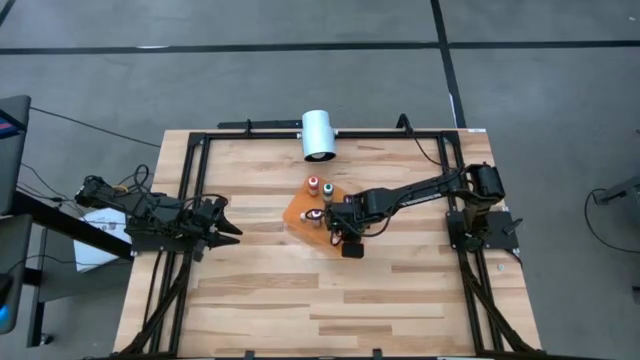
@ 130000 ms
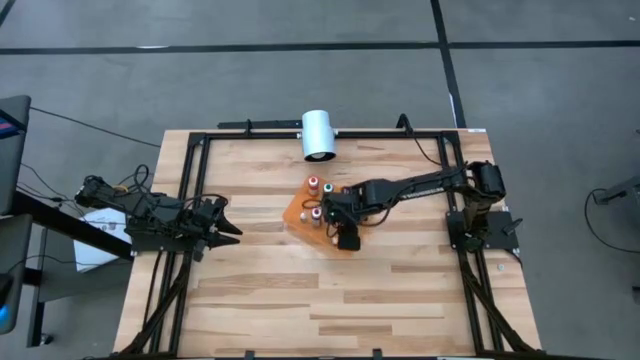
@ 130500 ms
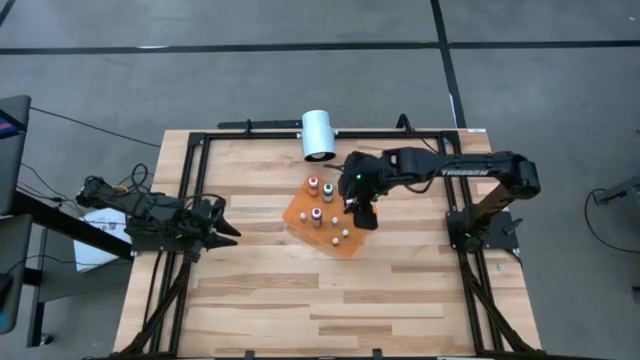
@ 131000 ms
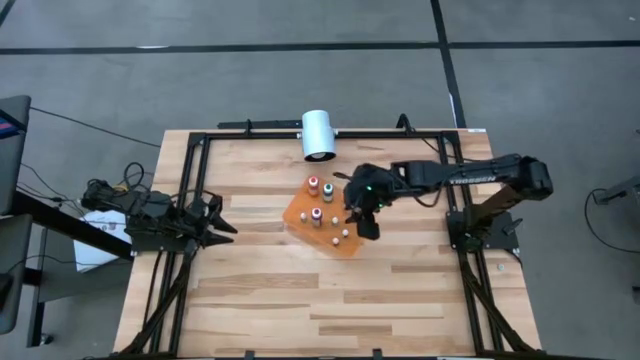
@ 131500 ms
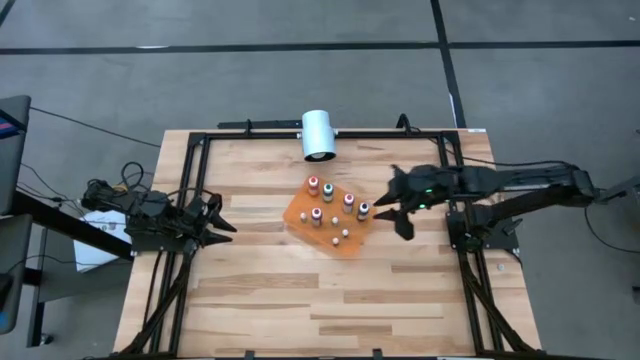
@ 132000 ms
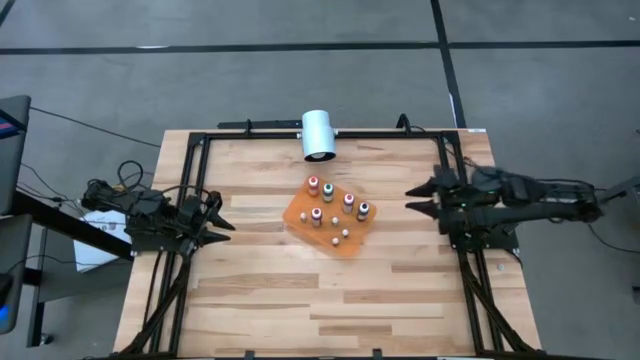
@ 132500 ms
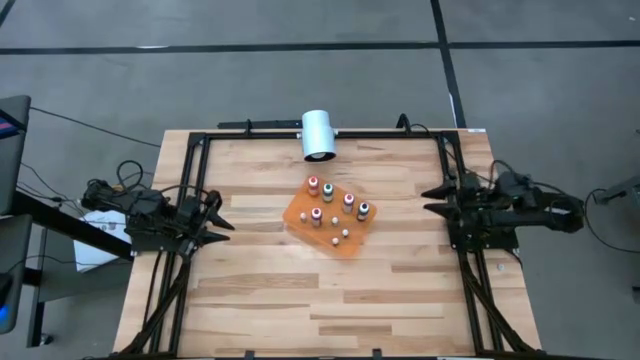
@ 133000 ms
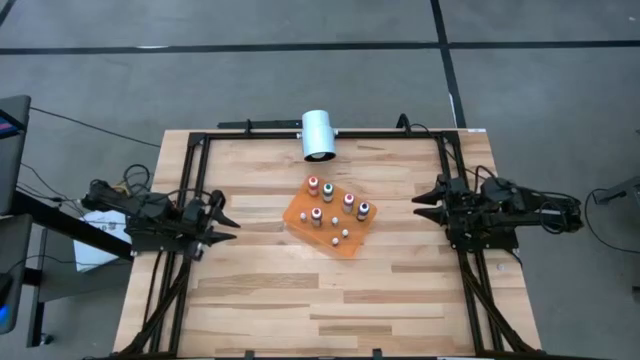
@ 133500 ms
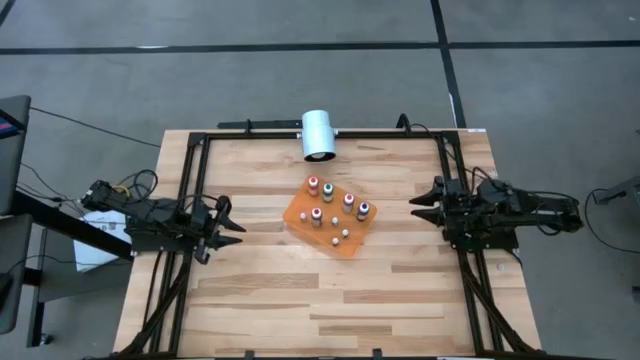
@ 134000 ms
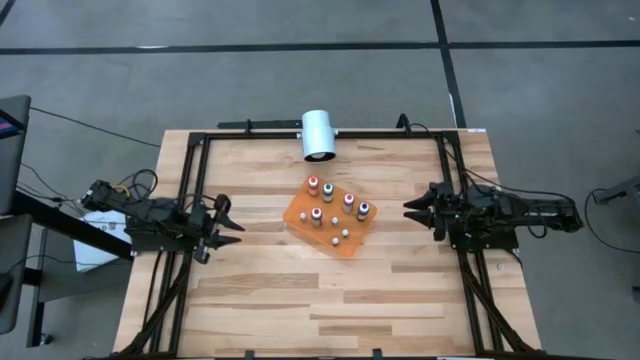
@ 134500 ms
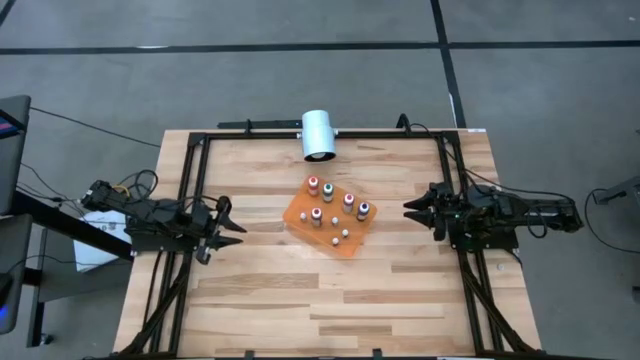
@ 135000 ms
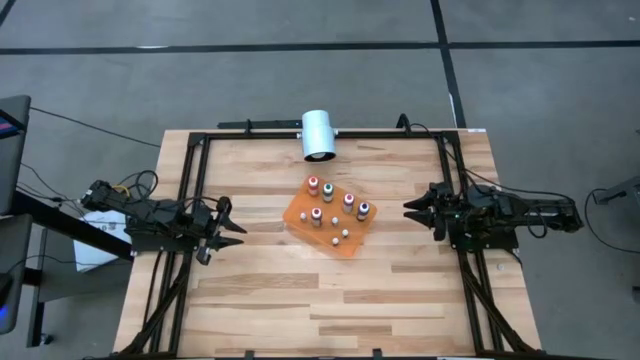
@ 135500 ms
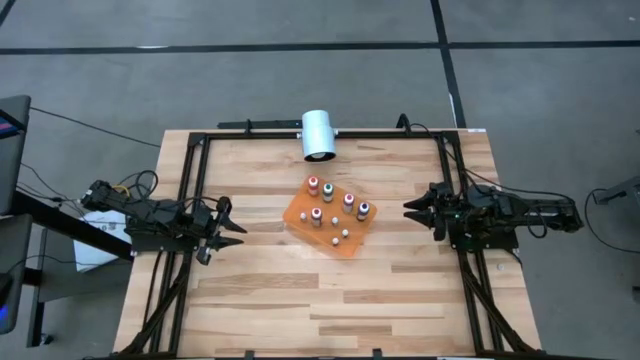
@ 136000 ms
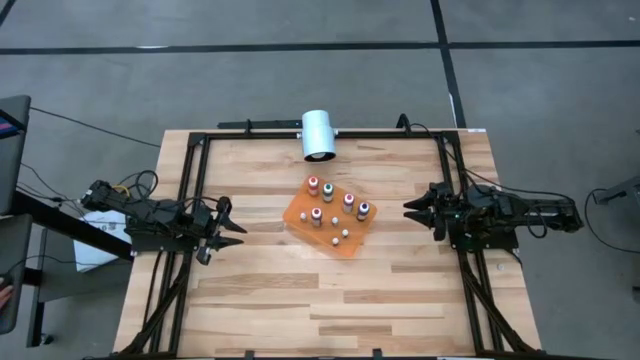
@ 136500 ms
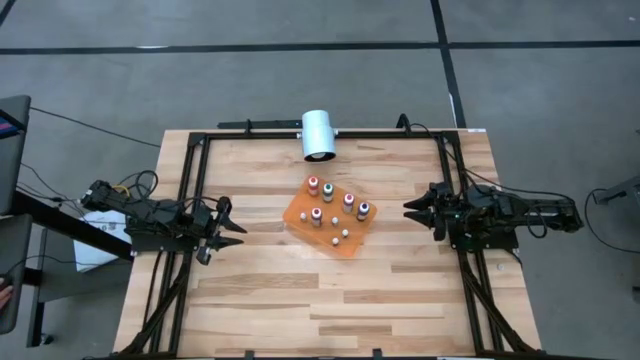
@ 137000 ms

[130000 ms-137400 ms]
Task: Pick & Place food coloring
Return to Home Position

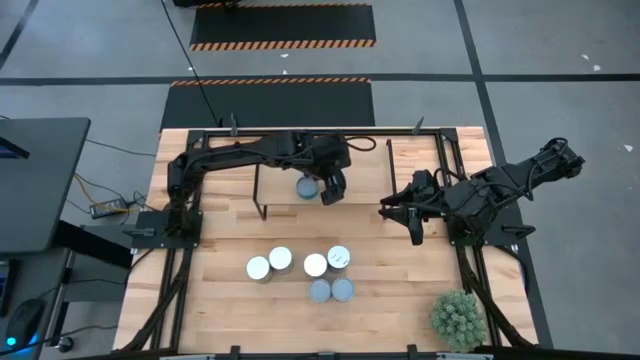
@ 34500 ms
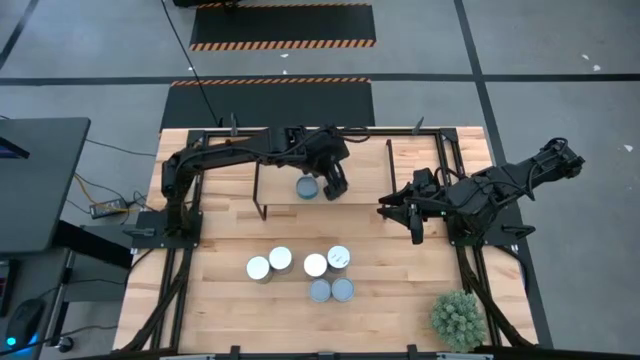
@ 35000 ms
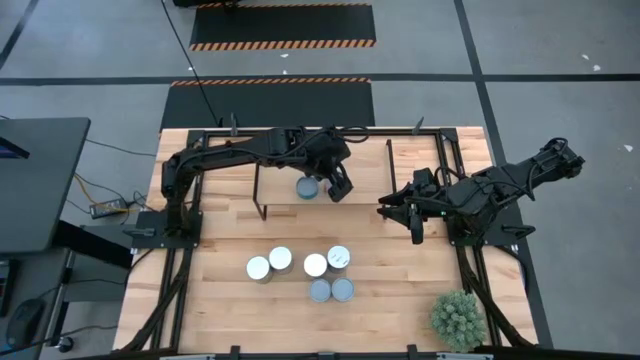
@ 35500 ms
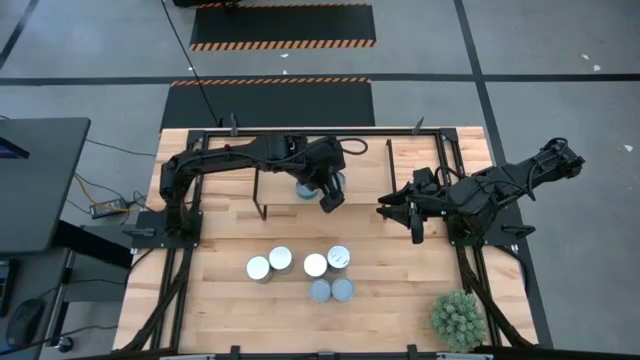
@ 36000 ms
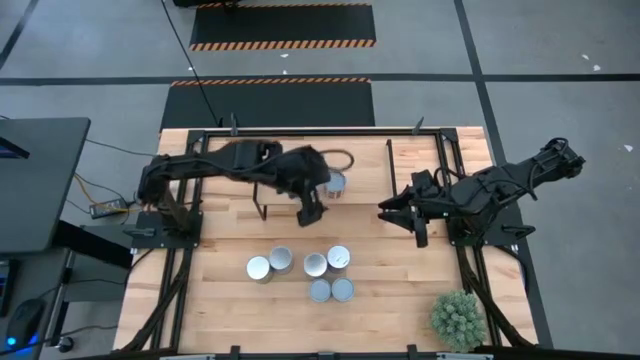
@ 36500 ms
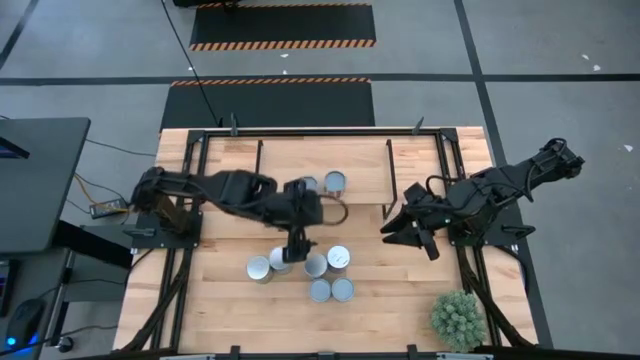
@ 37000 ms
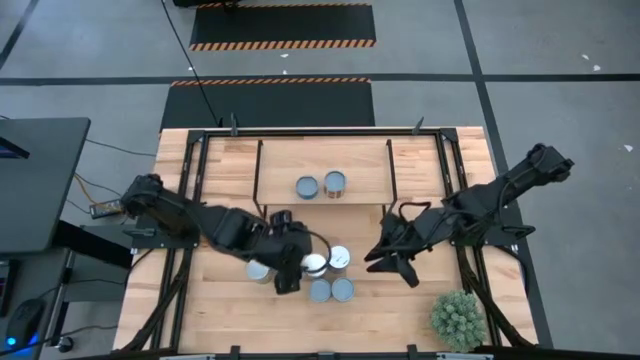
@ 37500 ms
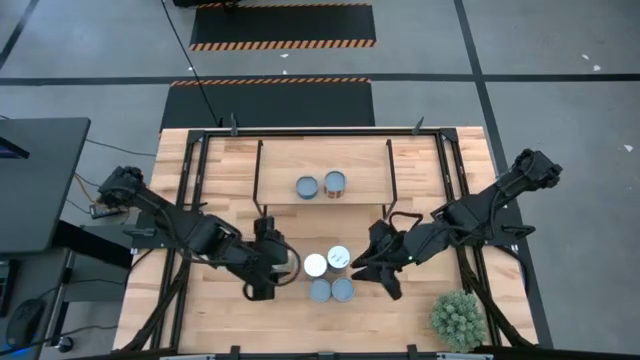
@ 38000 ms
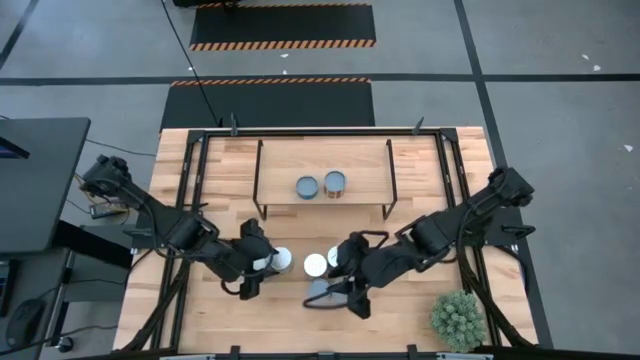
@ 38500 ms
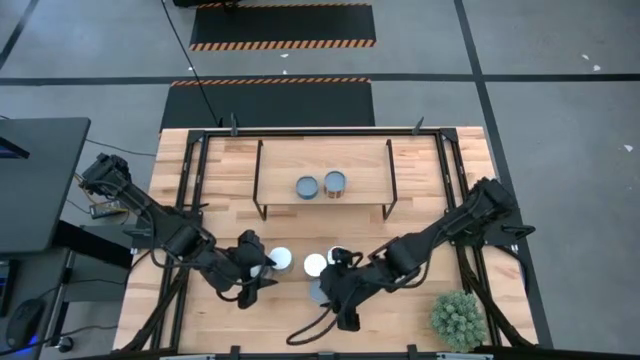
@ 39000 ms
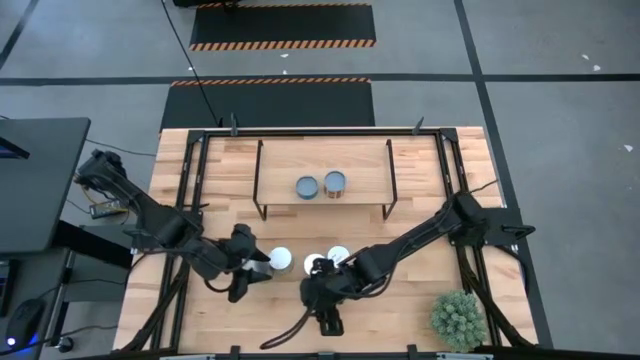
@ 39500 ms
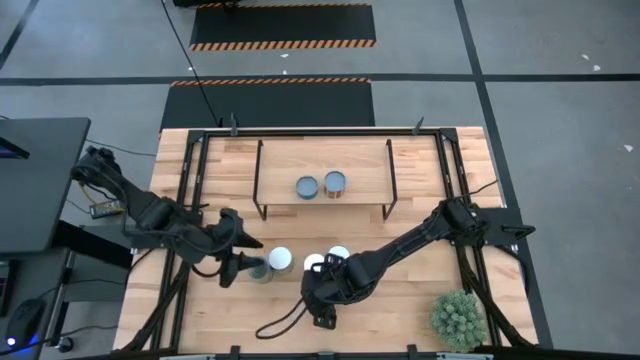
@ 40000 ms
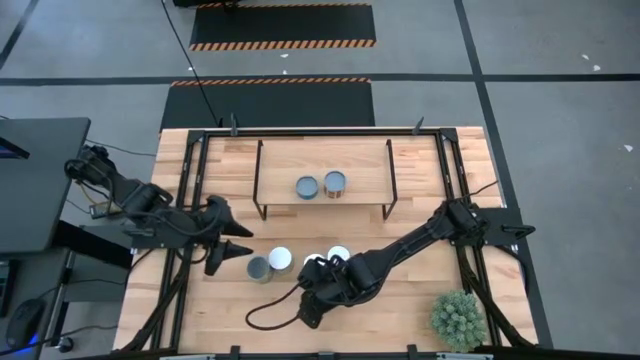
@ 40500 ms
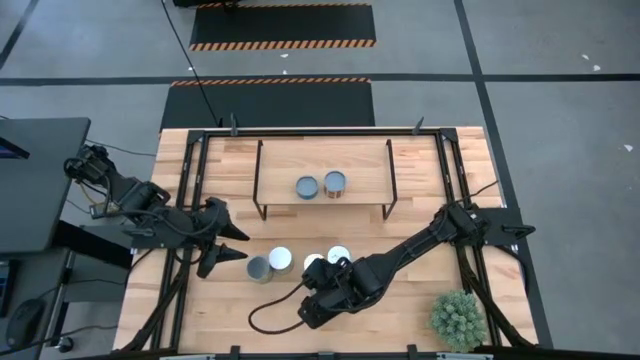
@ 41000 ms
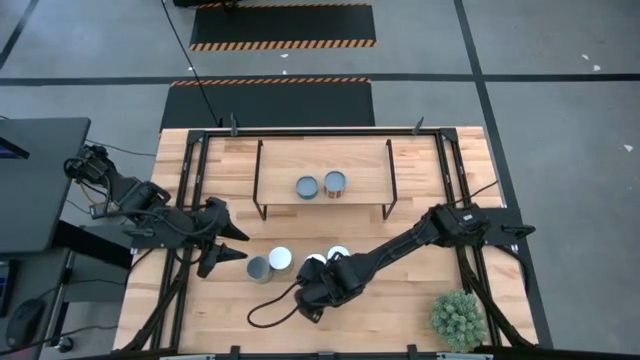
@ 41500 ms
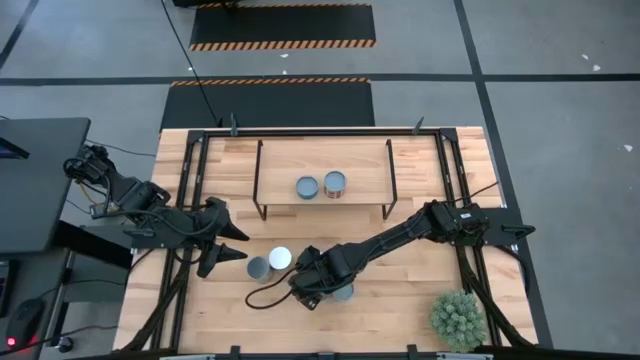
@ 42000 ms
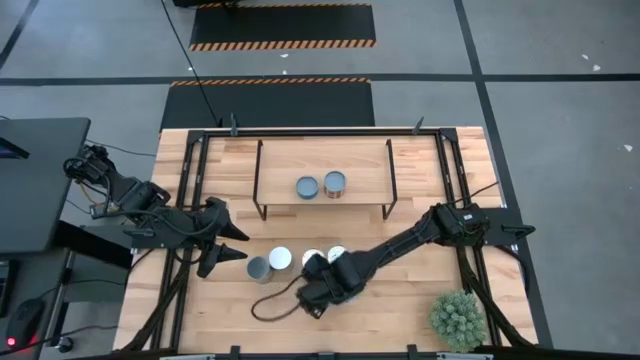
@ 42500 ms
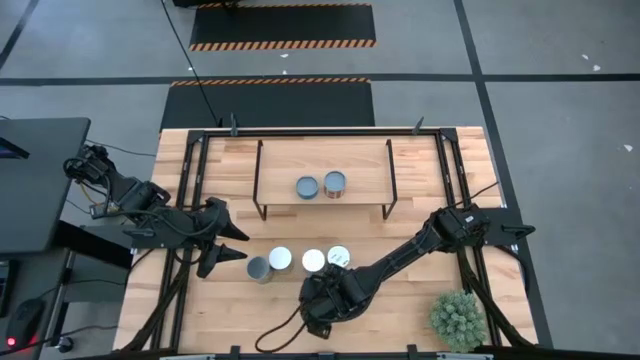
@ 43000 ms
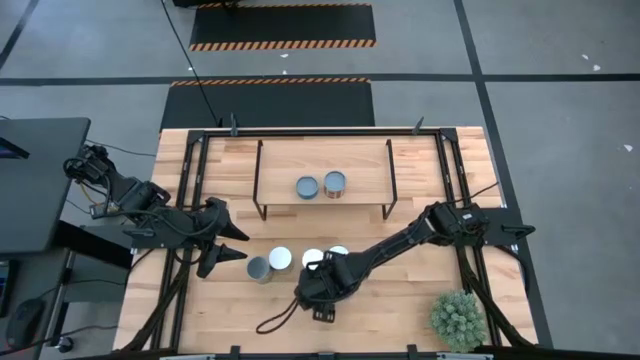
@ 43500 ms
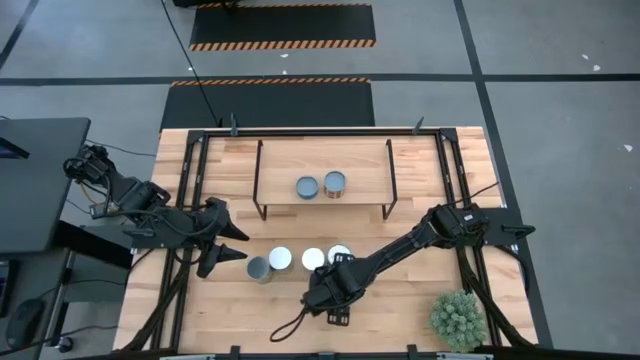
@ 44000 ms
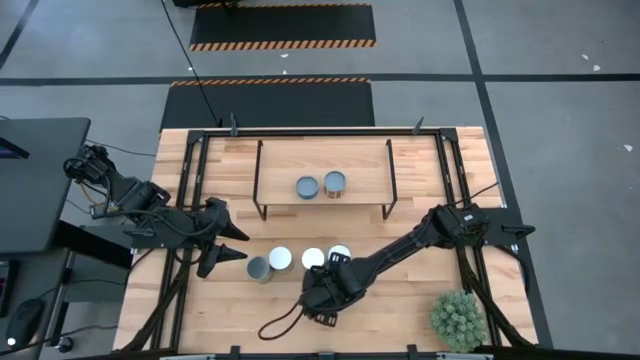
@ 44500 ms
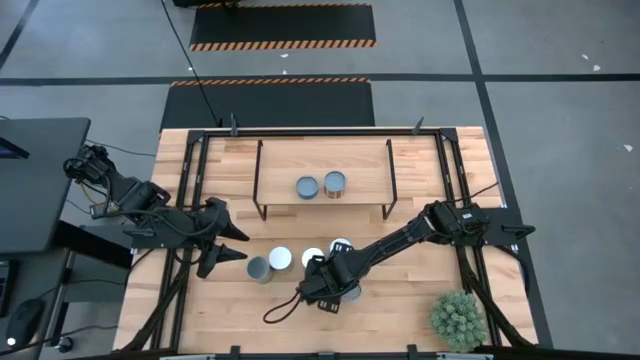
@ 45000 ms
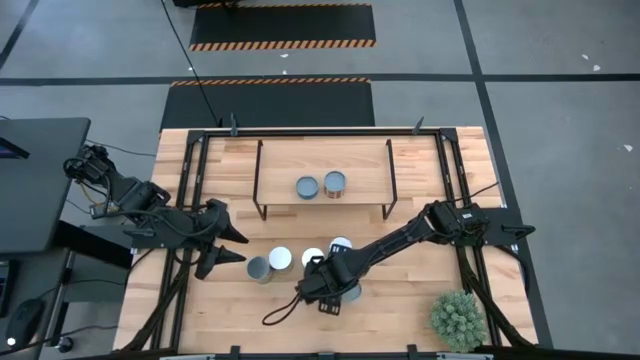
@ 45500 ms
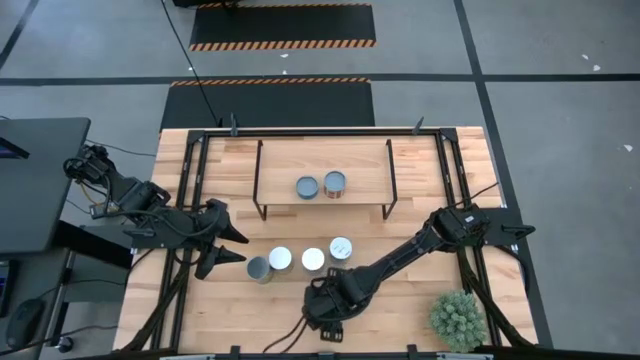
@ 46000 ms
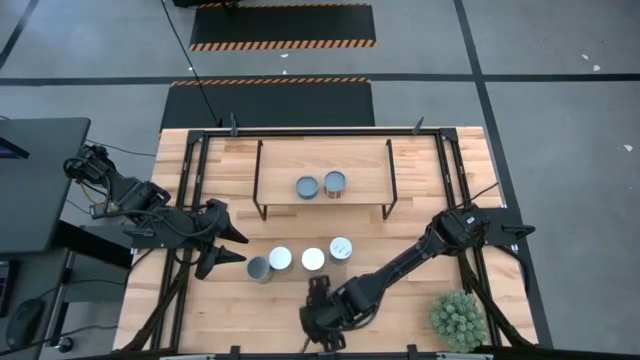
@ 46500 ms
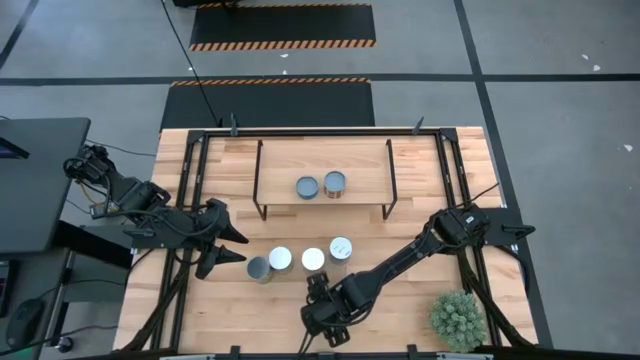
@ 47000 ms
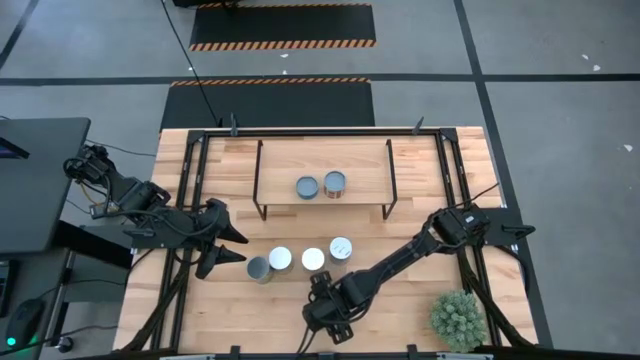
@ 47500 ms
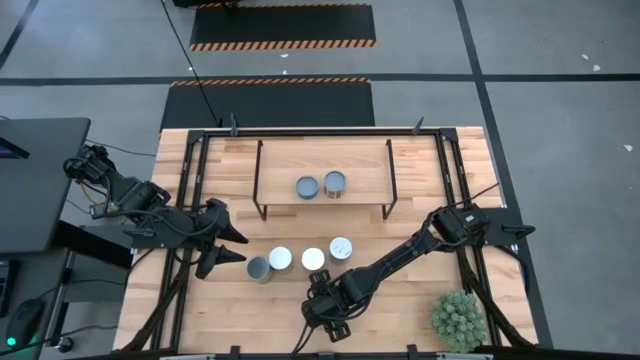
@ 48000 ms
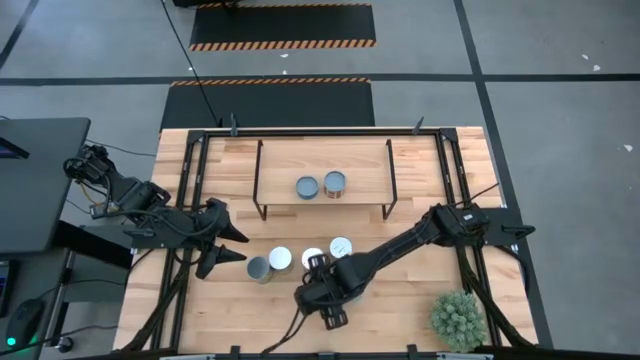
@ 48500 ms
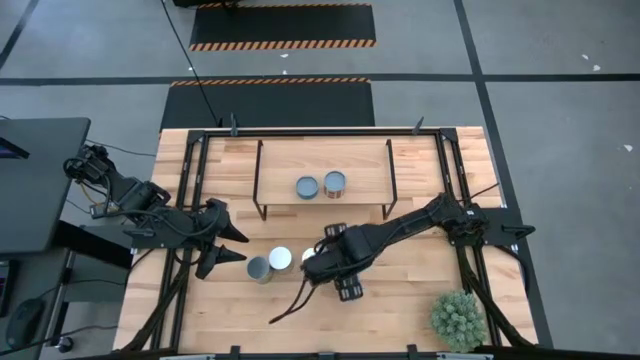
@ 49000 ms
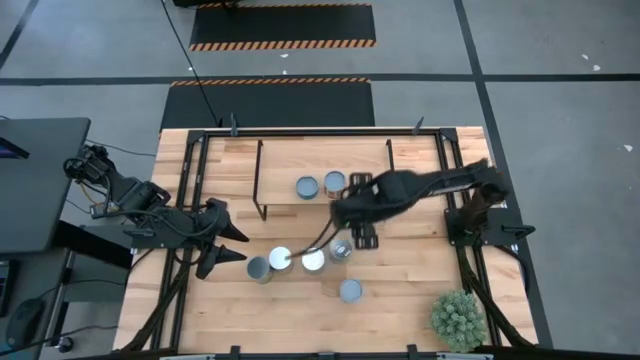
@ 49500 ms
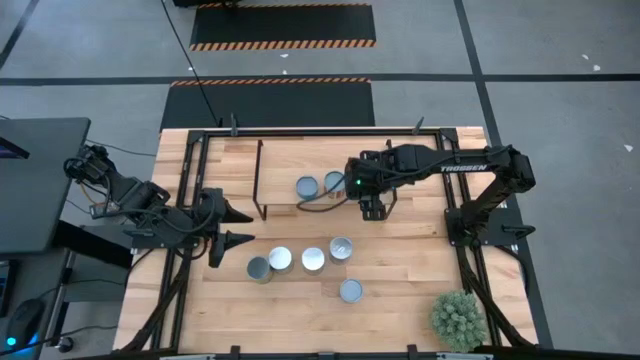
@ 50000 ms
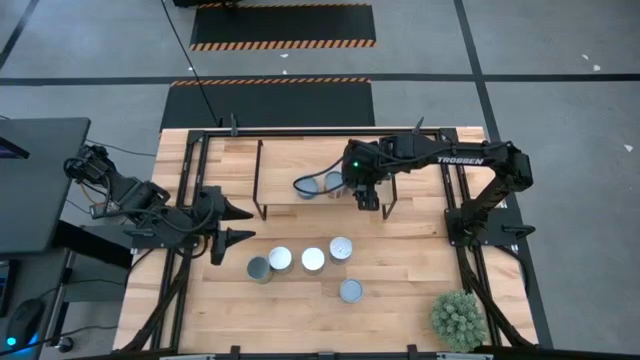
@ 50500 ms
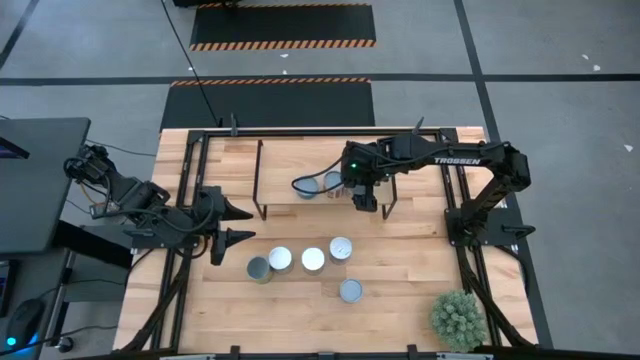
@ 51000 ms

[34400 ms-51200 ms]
Task: Pick and place cans onto a shelf
Put the canned peas on the shelf
